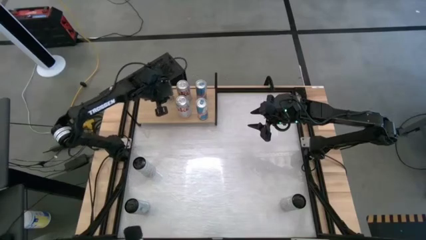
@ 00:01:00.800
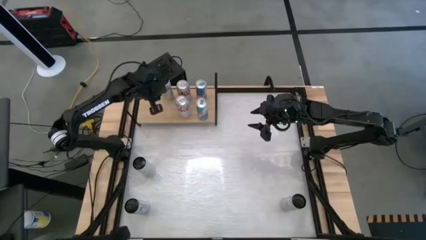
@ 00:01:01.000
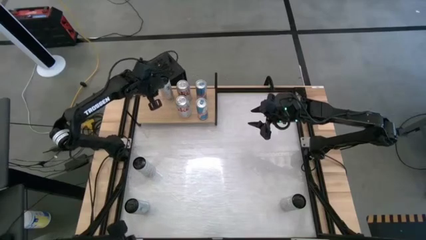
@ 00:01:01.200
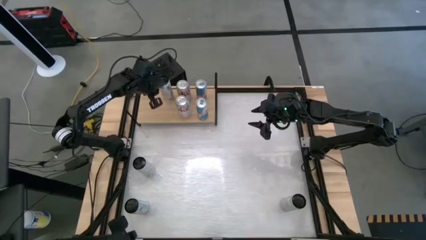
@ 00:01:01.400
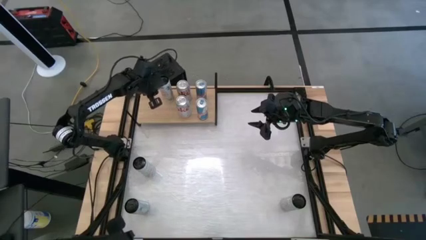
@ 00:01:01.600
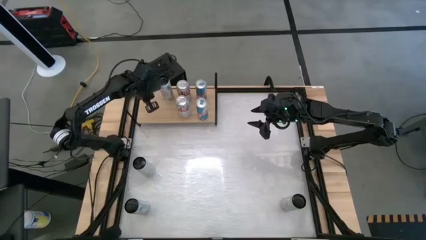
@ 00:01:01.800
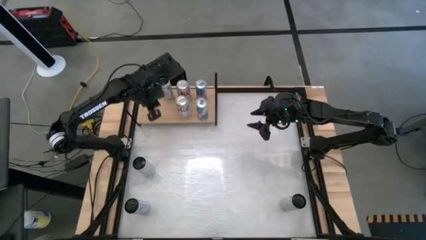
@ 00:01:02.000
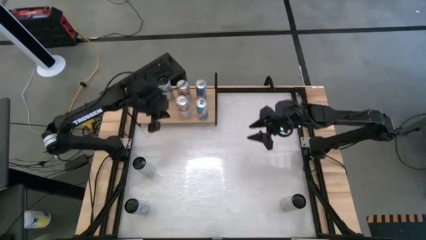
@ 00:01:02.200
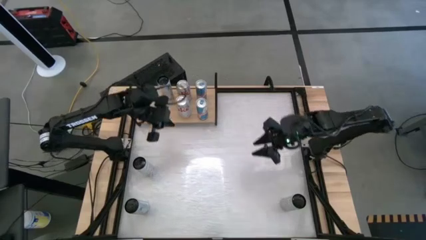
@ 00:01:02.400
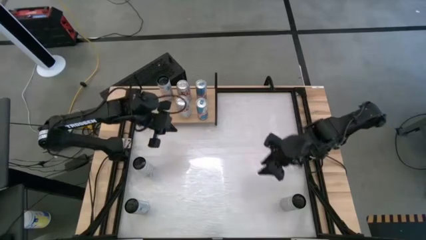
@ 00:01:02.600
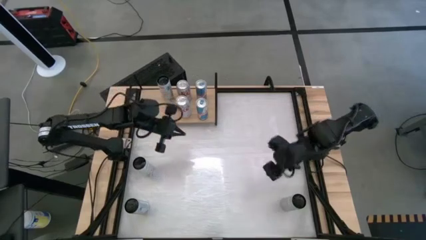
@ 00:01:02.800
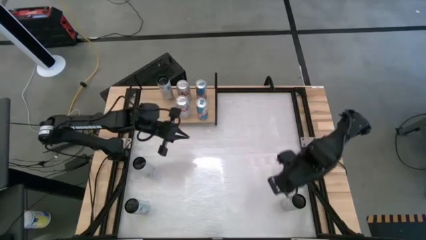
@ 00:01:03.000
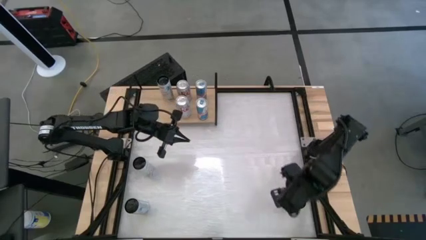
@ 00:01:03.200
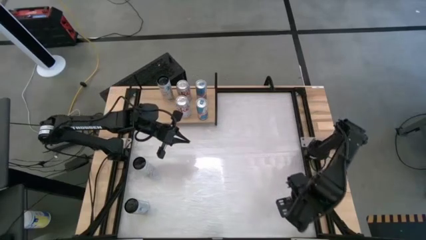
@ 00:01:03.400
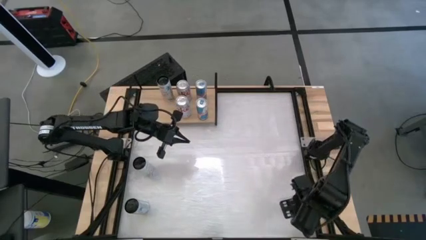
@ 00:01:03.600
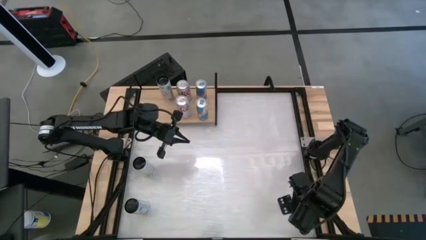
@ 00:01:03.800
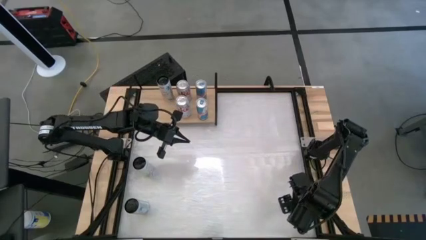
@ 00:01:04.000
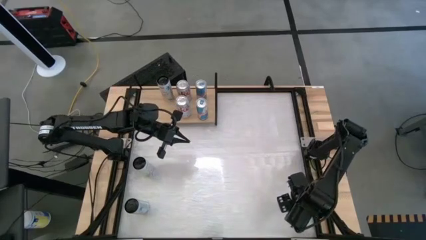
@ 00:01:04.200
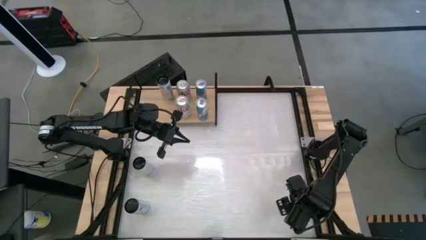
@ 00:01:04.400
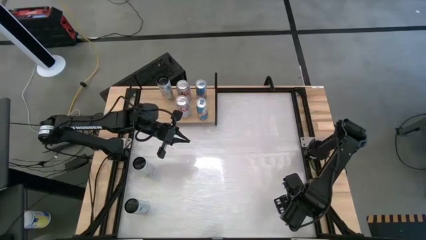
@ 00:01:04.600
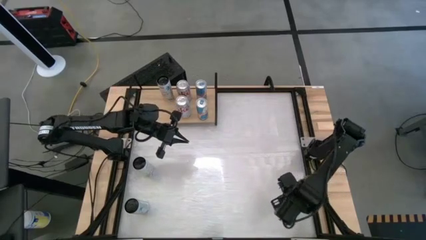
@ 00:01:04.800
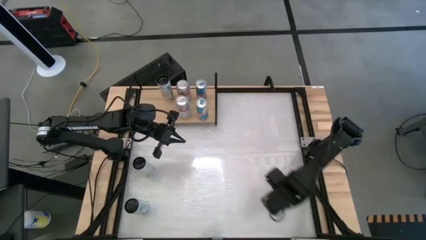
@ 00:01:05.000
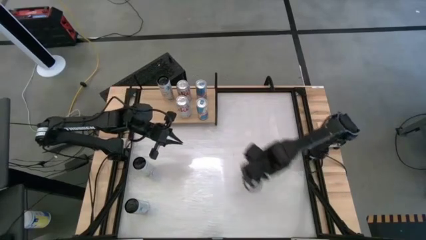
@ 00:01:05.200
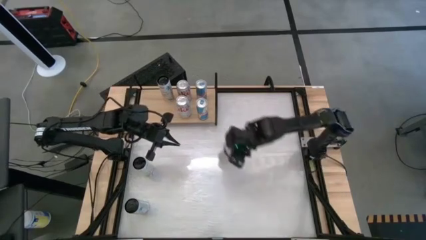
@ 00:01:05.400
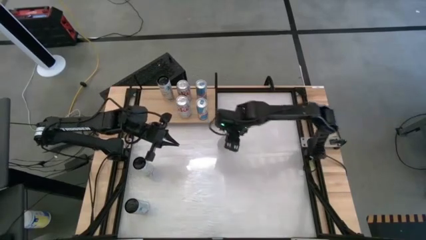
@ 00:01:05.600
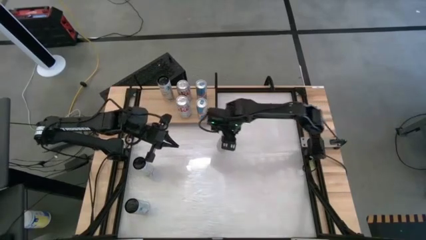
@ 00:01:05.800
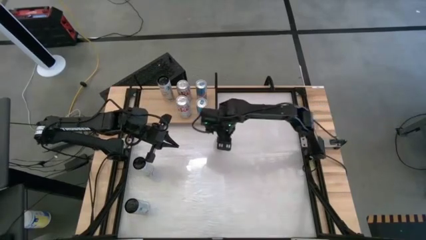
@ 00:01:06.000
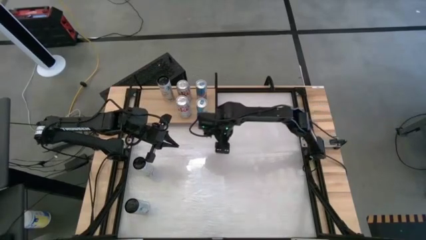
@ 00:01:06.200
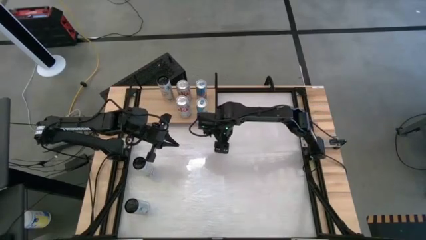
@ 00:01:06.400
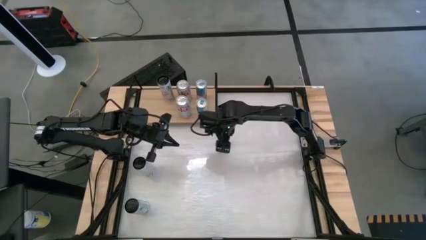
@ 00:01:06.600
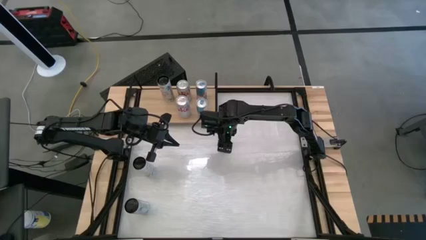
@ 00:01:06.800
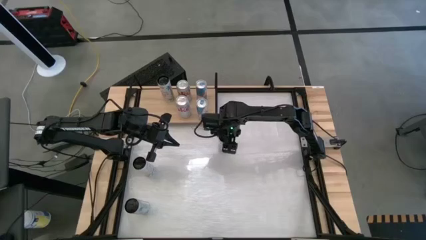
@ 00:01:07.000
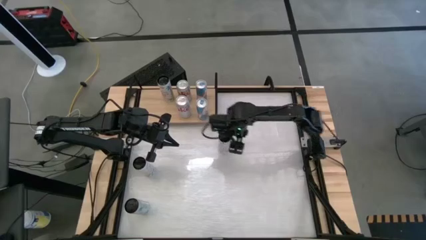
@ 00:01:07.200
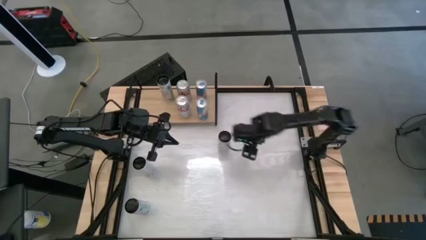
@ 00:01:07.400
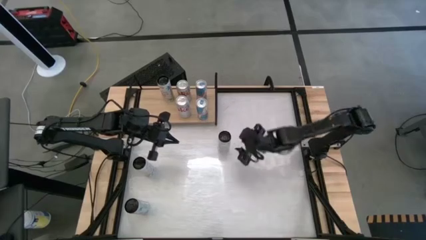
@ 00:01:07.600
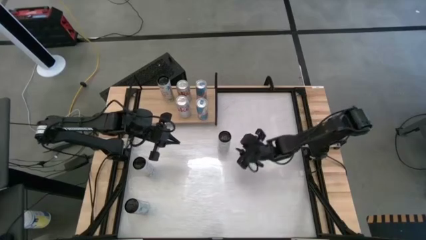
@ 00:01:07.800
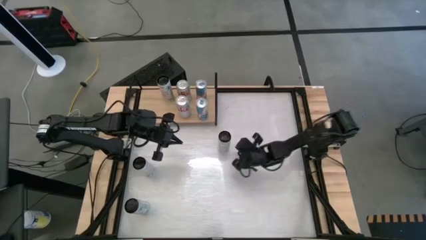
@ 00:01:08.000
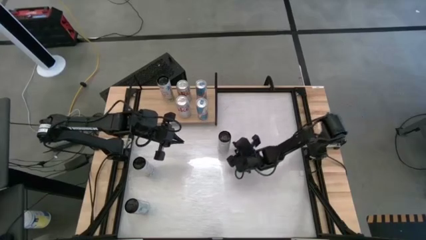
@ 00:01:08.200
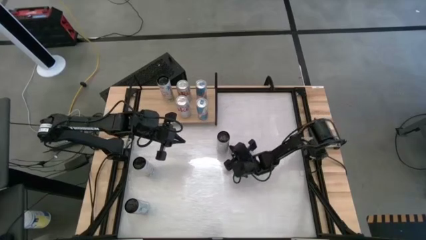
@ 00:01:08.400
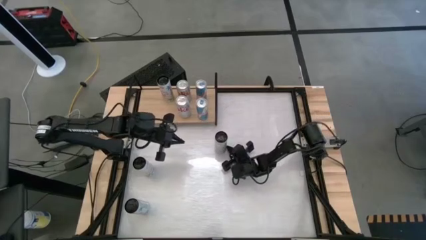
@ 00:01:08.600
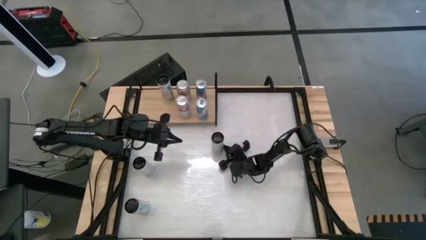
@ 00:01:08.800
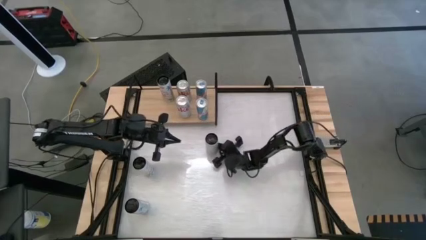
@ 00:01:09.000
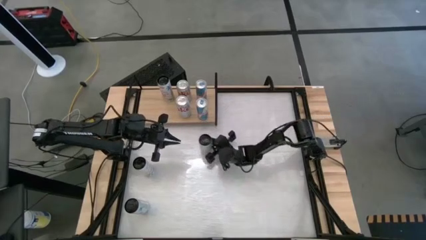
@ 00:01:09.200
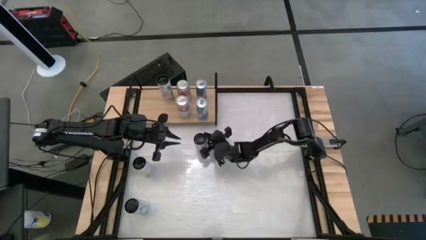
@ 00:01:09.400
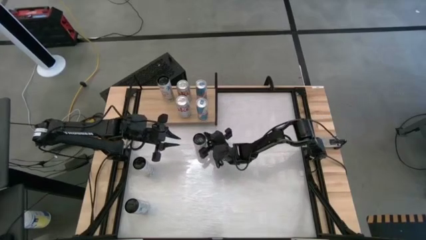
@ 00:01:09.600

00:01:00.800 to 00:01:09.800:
Task: Place canned beverage on shelf
Move the bottom right white soda can to the center of the table

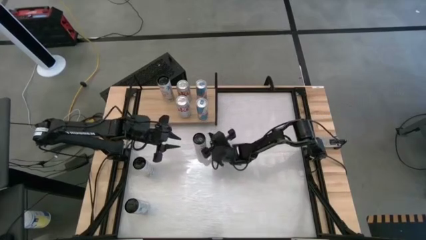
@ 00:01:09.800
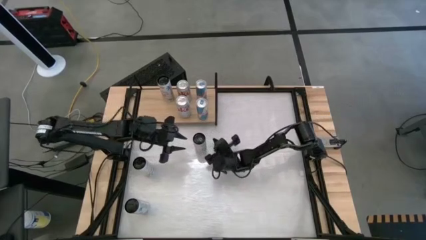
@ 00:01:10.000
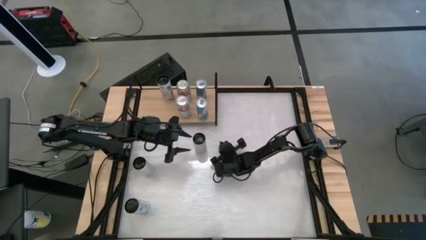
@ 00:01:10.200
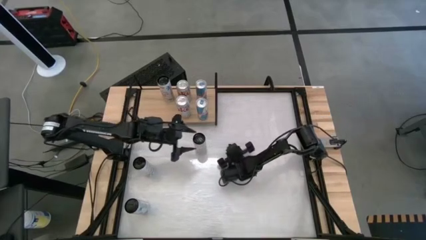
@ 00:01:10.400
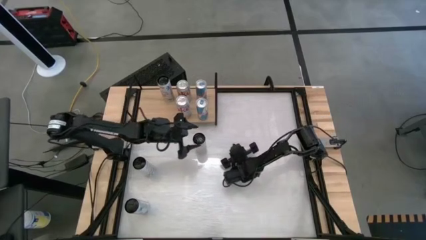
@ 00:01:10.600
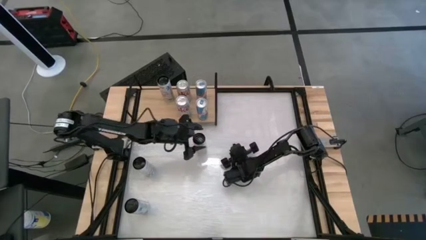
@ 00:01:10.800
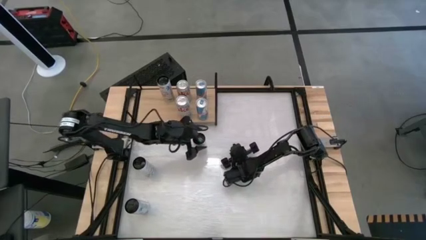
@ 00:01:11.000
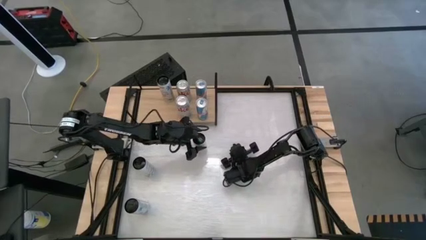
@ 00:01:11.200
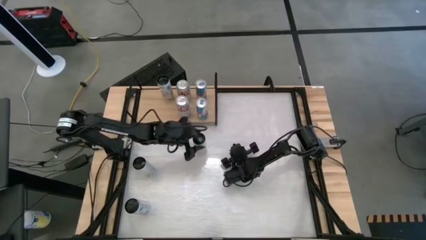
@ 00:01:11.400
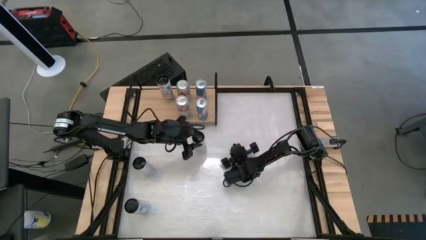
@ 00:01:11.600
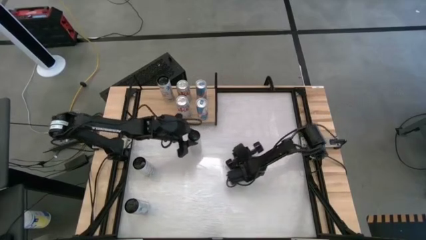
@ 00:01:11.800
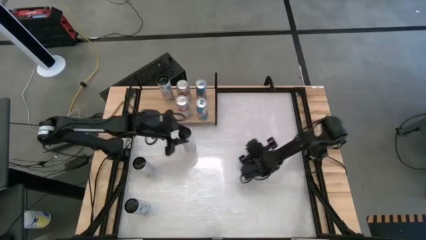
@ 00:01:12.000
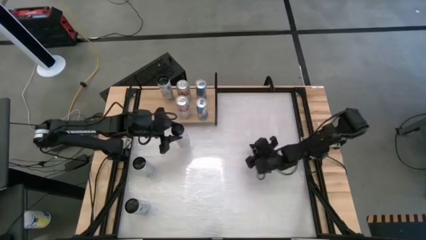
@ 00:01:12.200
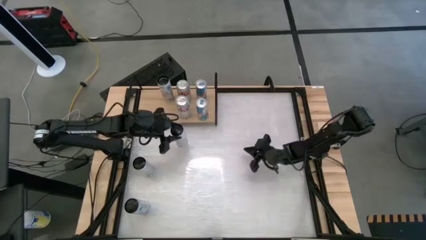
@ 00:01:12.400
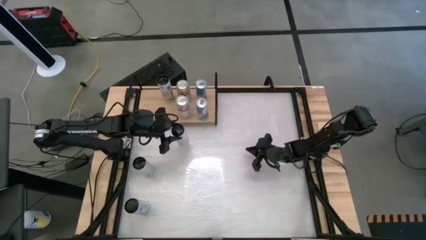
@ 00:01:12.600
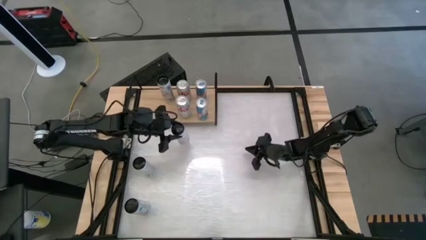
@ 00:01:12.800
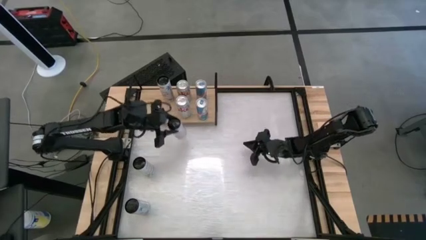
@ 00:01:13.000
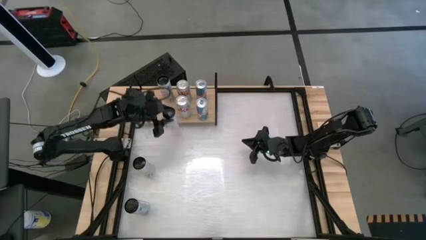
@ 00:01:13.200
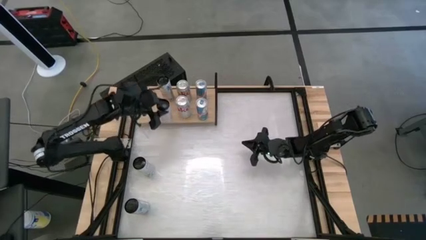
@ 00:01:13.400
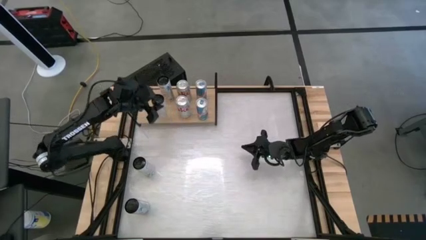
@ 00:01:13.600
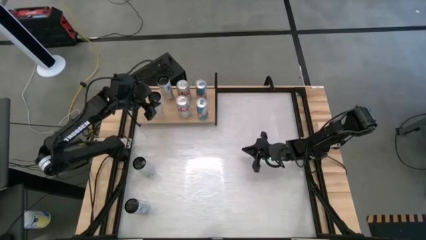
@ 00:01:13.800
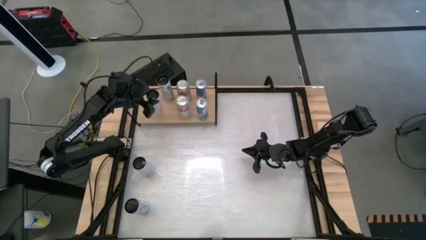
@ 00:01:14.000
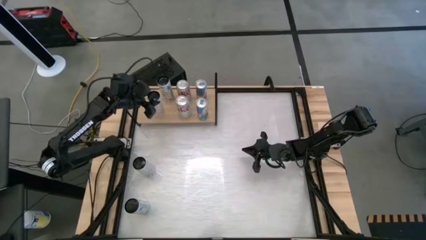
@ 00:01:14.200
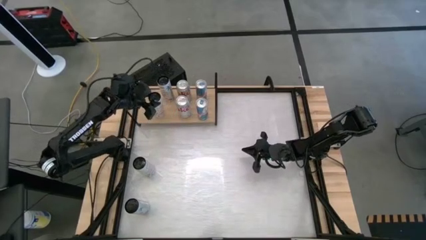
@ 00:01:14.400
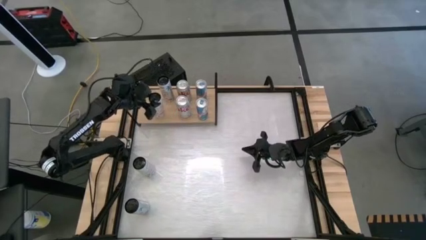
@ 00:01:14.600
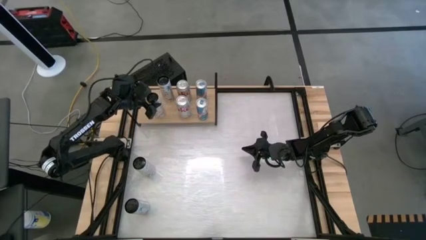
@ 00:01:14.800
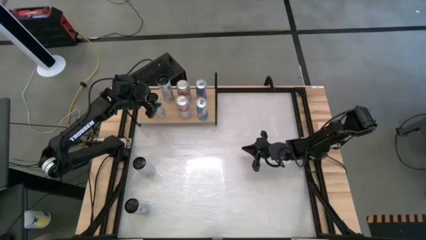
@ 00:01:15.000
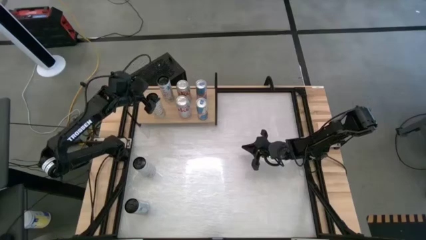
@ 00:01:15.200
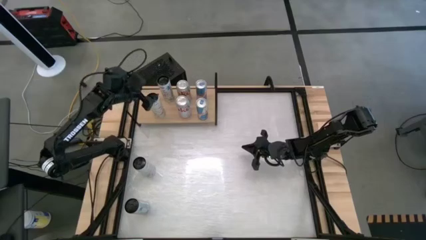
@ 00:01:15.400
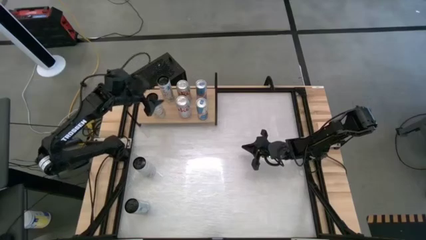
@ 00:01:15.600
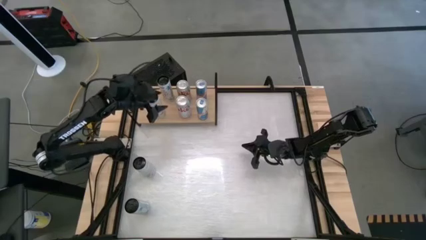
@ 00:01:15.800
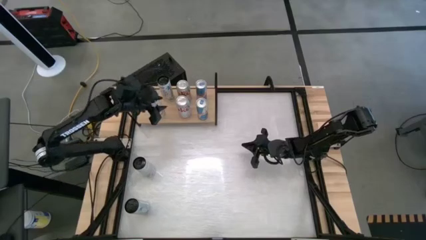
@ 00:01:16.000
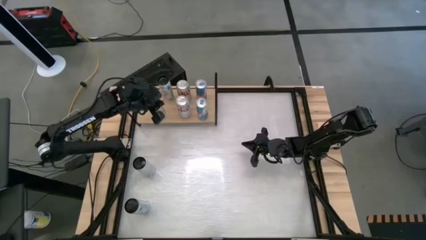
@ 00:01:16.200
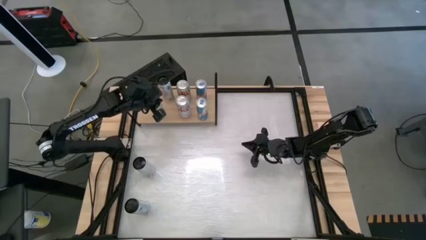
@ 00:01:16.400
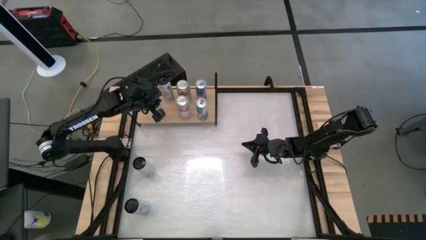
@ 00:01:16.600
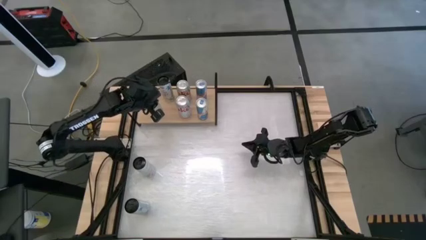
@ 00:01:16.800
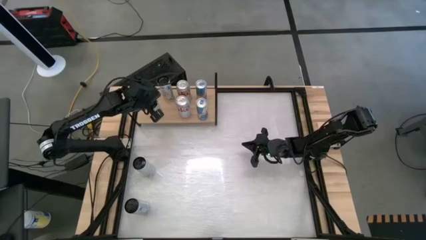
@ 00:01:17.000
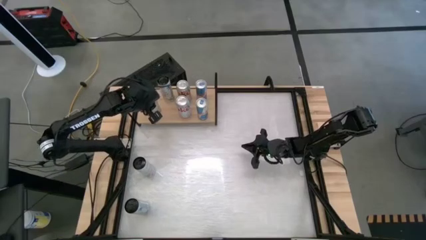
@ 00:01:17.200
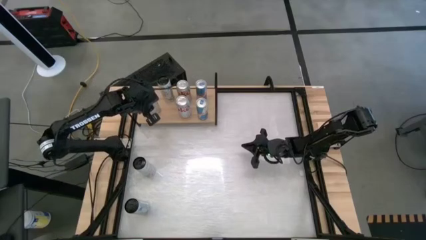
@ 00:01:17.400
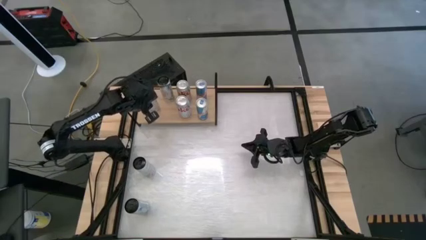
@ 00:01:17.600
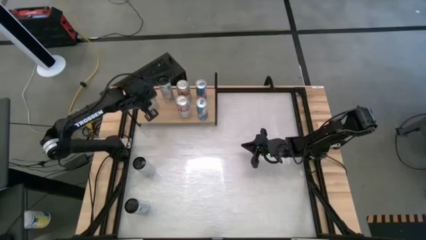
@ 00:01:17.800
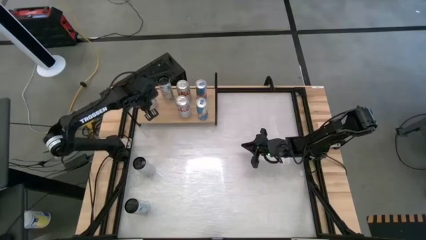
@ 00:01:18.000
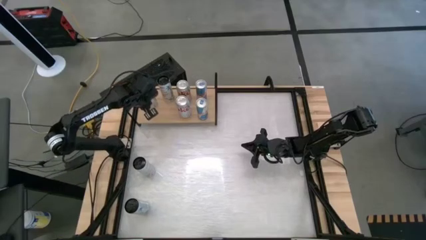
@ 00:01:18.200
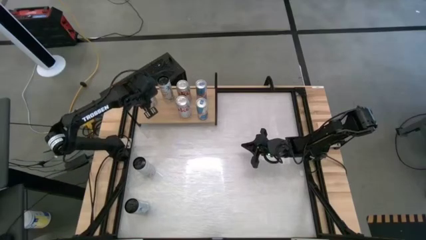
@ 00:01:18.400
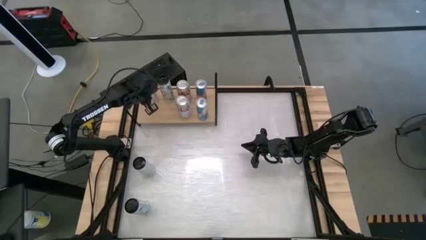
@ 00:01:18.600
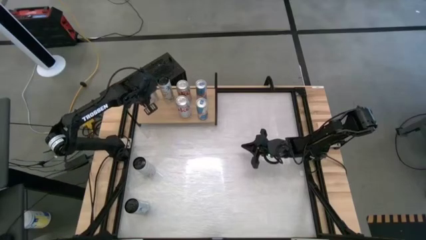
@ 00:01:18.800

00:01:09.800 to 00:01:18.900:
Put the top right white soda can on the shelf
